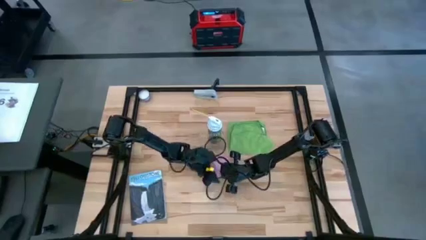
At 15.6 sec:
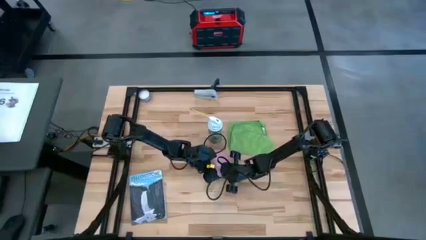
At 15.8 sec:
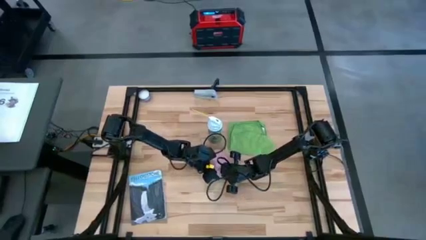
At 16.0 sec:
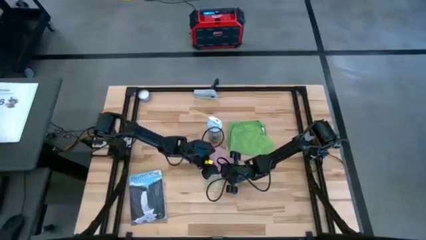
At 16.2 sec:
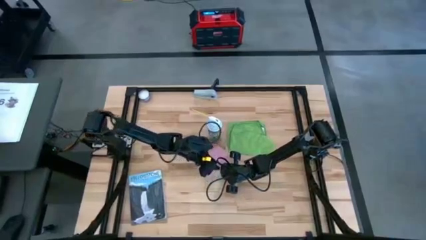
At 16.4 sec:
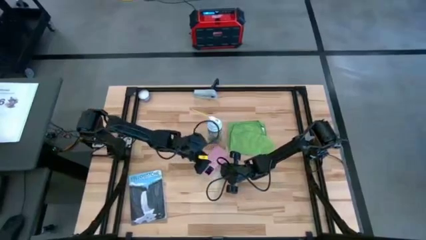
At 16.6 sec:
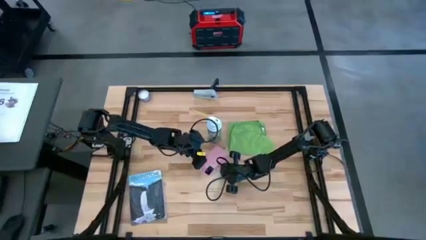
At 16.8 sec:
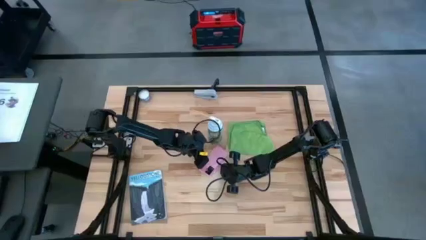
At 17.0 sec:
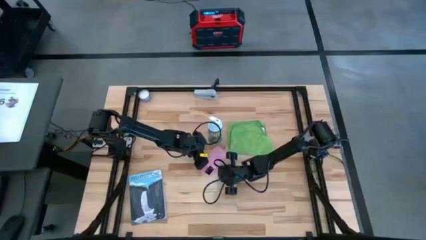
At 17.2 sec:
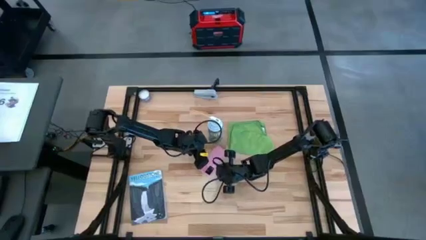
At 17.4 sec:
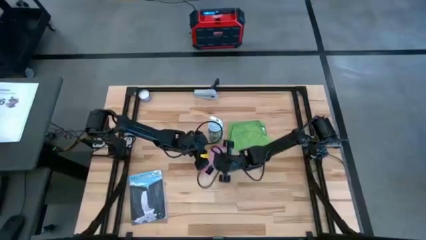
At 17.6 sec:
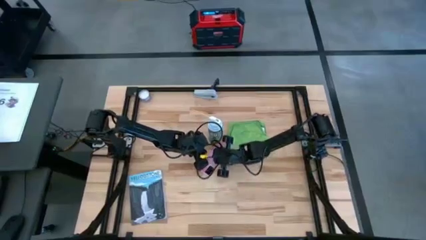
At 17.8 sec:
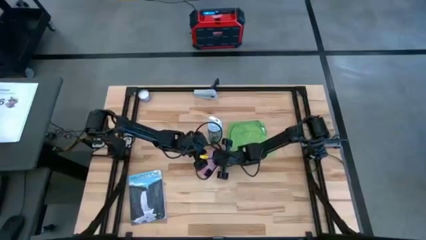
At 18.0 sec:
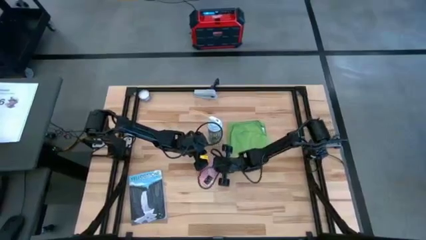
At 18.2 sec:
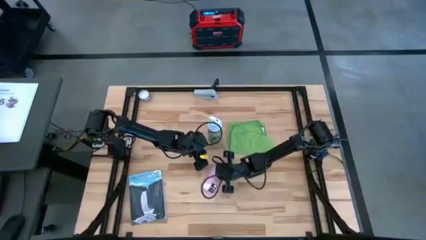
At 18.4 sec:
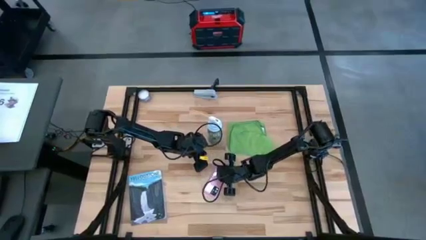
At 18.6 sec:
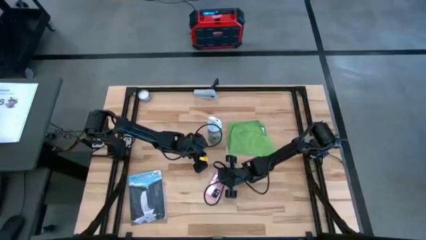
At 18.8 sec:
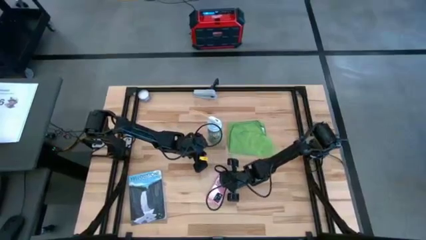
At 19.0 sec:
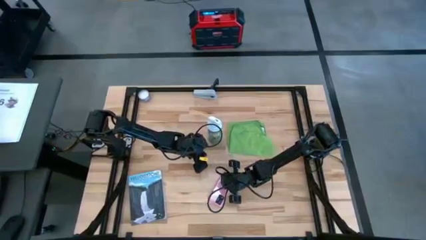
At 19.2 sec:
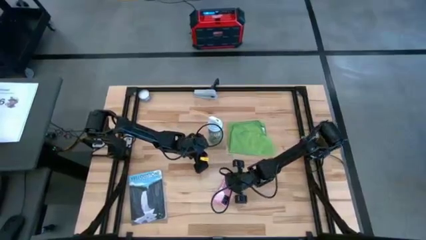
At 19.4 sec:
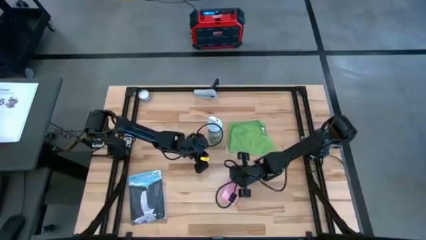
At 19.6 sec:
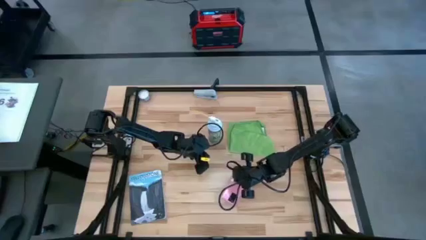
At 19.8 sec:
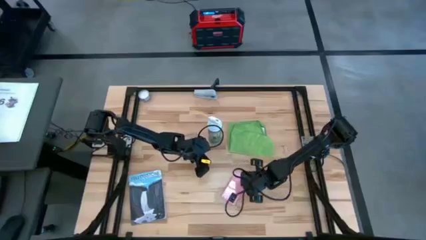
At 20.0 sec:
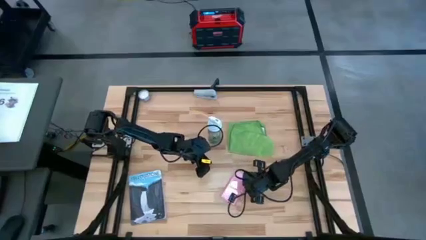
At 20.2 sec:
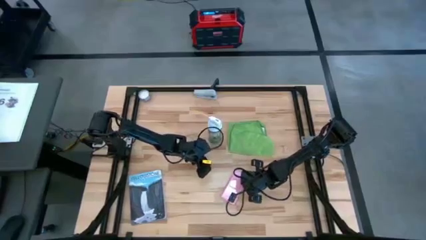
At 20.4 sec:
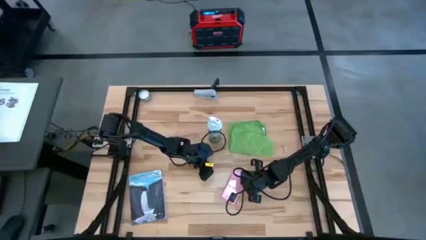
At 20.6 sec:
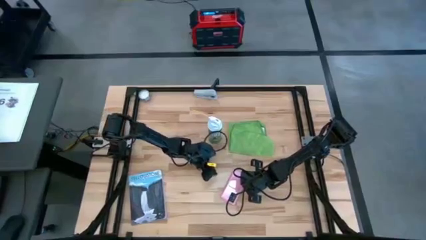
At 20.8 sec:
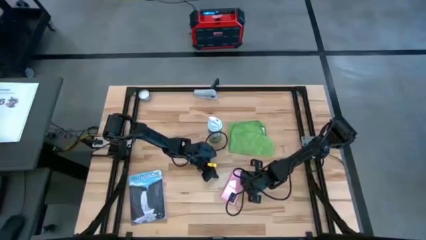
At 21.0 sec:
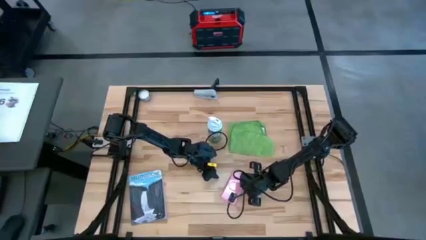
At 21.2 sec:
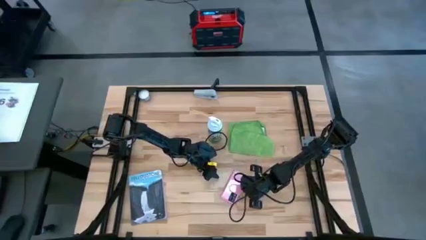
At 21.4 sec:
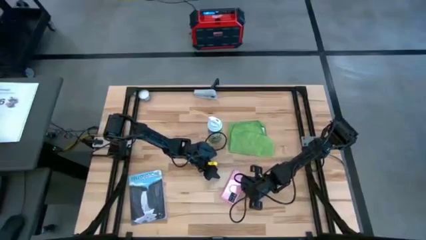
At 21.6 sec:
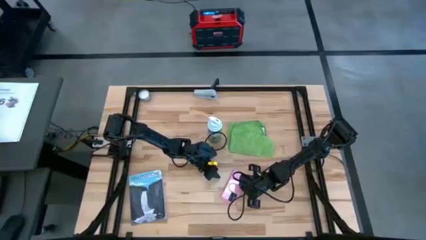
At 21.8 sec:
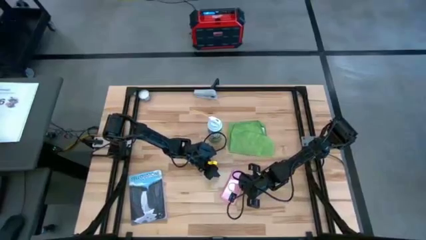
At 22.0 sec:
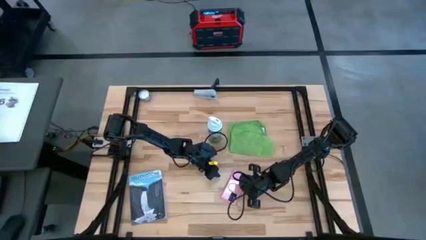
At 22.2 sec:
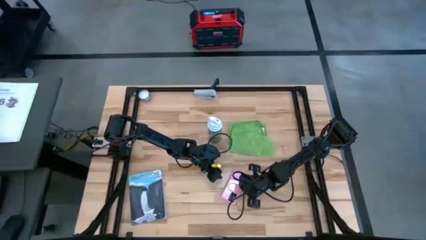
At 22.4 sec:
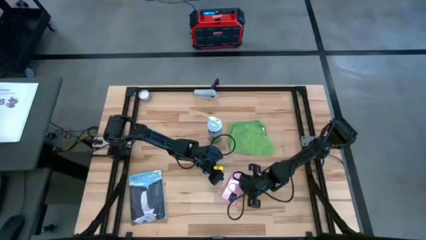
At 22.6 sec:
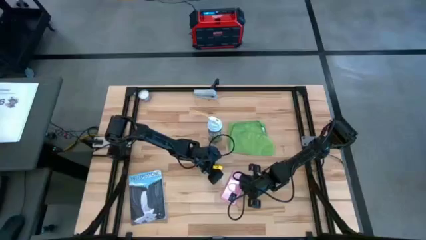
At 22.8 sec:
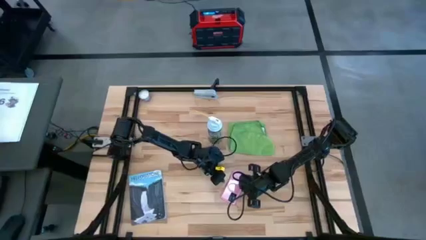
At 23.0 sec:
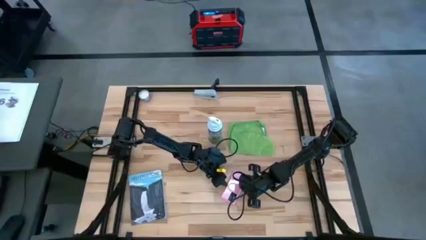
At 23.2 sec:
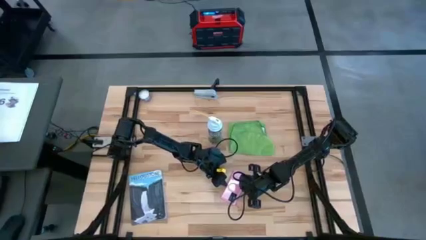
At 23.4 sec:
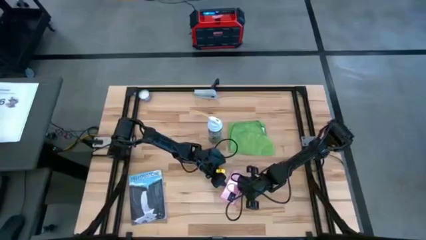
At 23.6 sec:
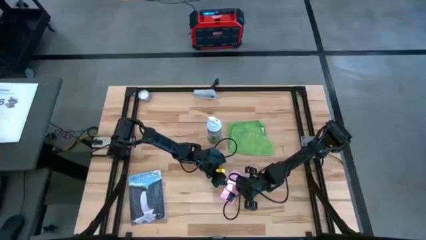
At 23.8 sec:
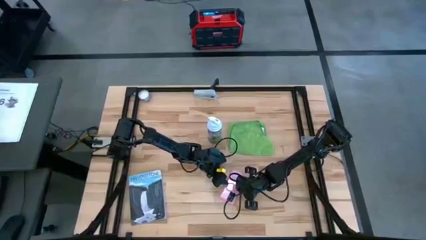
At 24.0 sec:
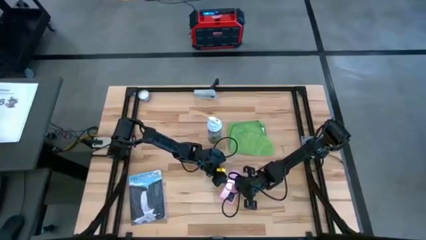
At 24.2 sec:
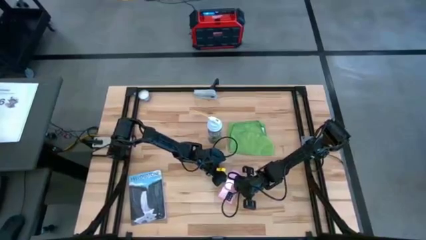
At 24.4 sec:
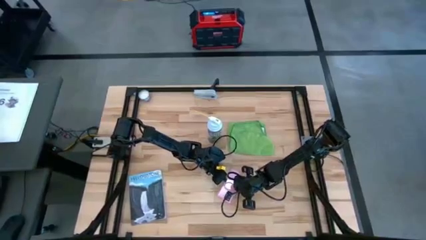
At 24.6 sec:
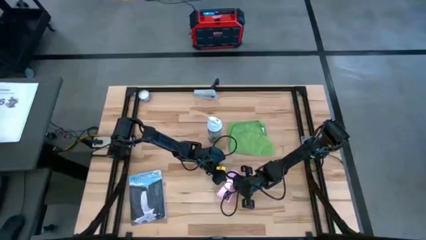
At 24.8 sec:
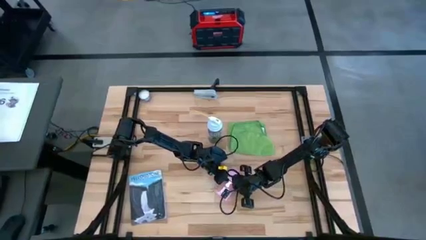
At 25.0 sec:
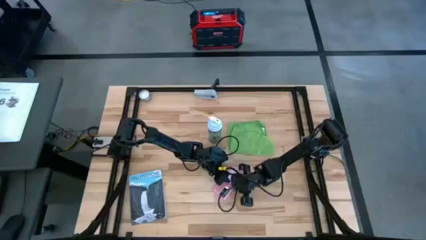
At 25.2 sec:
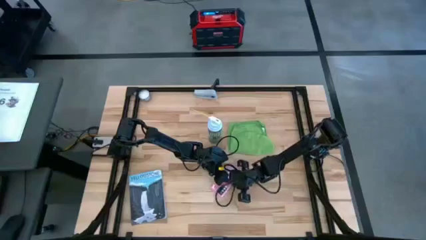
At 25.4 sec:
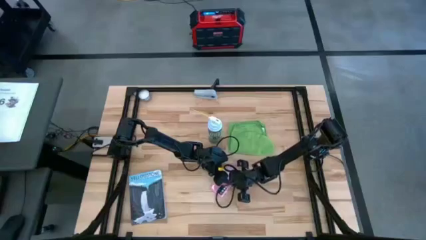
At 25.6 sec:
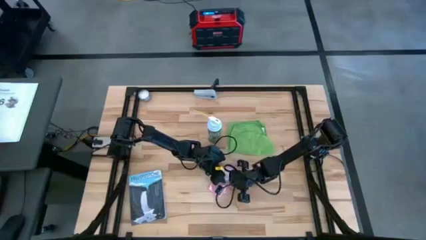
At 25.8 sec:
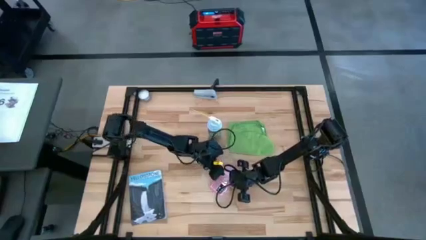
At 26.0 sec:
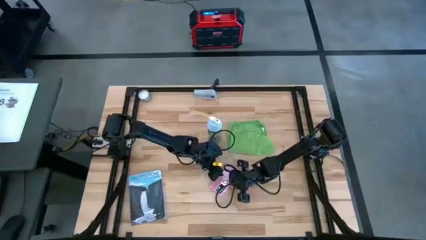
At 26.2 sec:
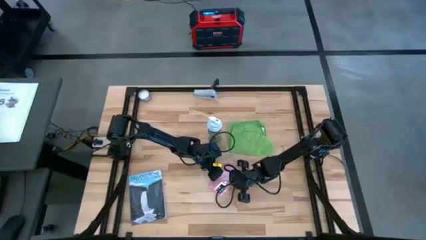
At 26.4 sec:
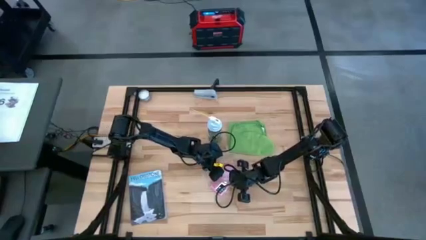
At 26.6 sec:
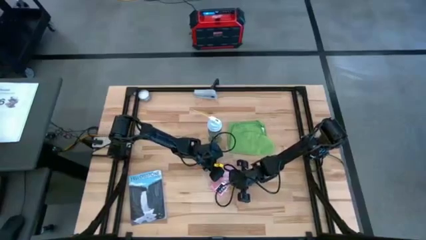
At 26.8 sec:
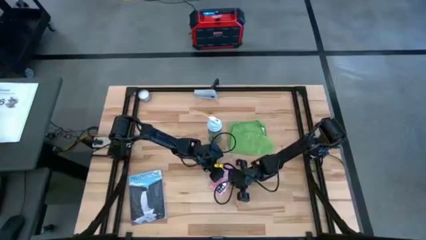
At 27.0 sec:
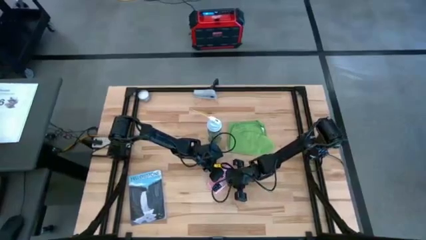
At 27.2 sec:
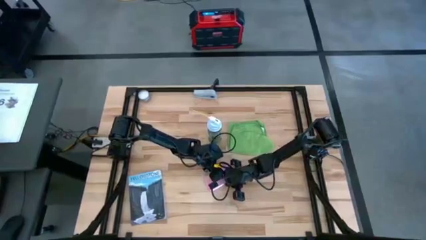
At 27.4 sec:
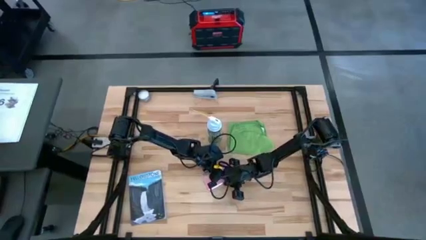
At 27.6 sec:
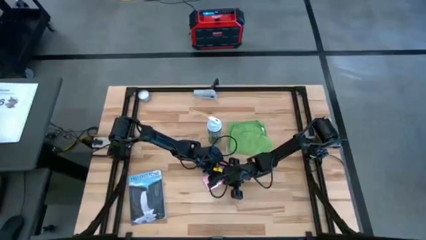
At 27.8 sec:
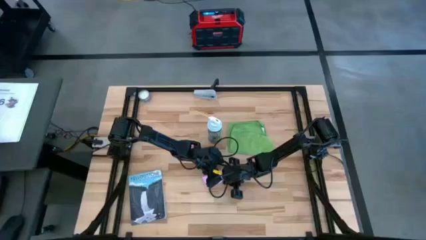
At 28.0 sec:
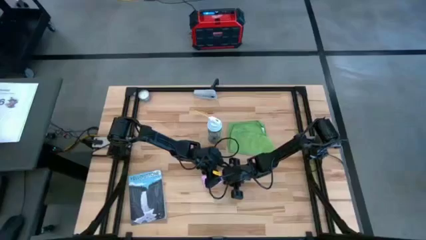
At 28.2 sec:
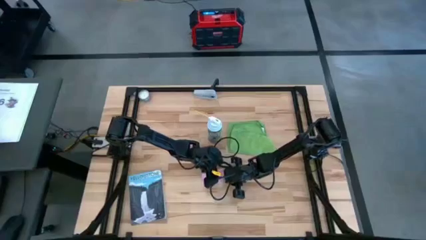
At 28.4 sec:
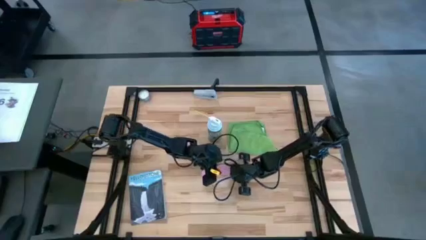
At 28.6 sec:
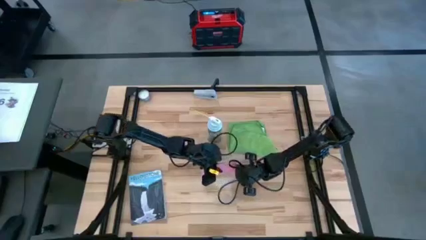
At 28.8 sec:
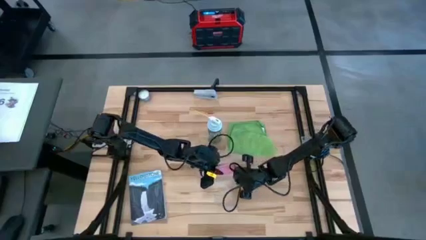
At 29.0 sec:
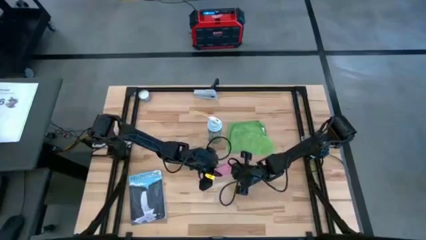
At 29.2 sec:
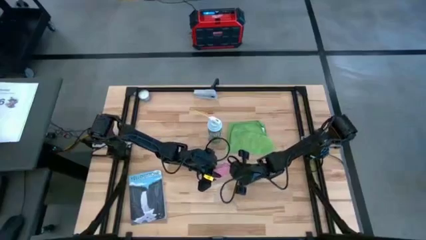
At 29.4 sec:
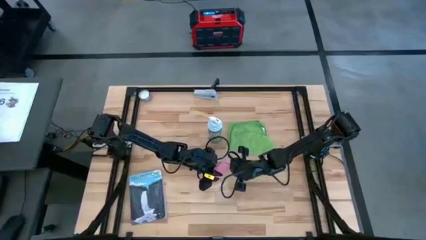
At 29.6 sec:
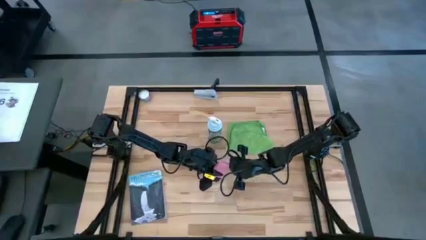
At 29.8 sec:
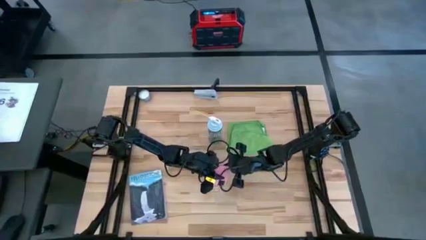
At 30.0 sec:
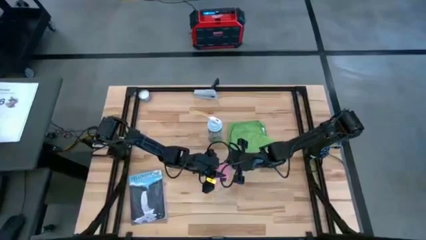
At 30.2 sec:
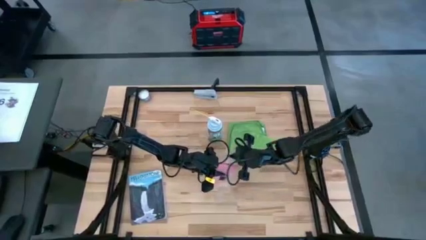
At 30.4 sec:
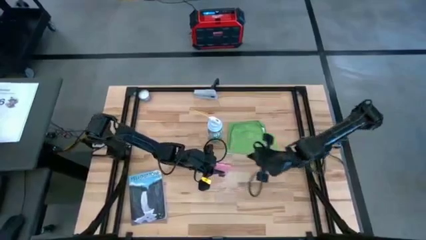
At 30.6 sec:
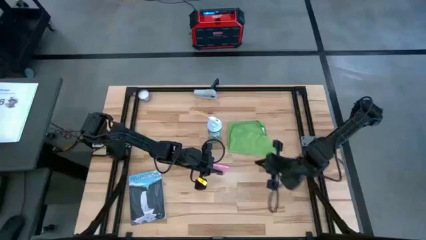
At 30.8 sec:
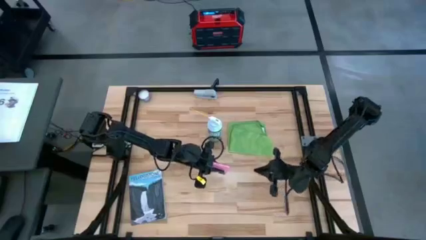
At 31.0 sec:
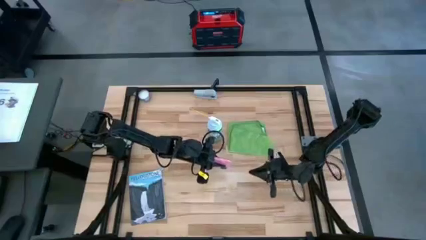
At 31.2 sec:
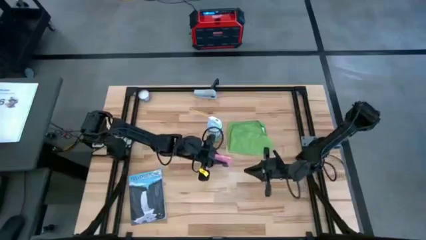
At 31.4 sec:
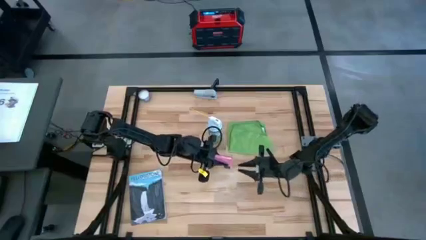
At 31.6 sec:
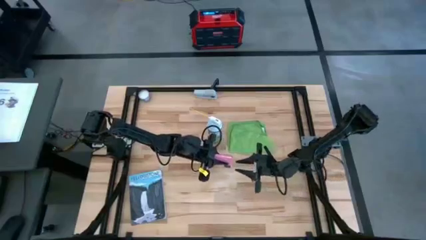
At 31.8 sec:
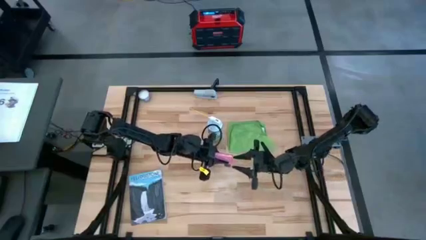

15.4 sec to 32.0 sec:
Task: Apply microfiber cloth
Spray the pink cellphone using the spray bottle
